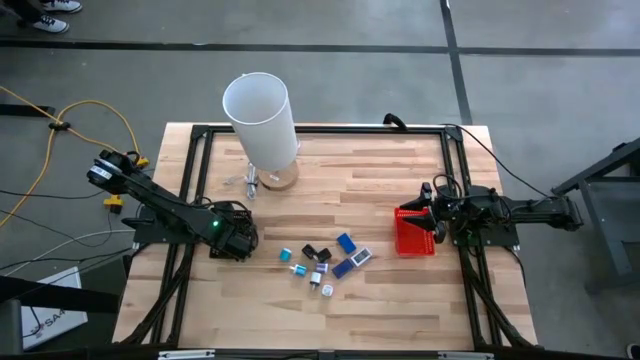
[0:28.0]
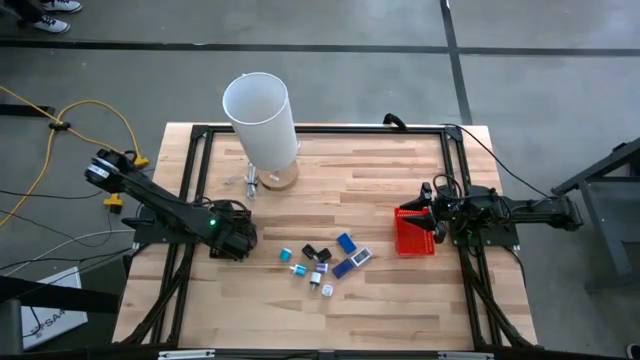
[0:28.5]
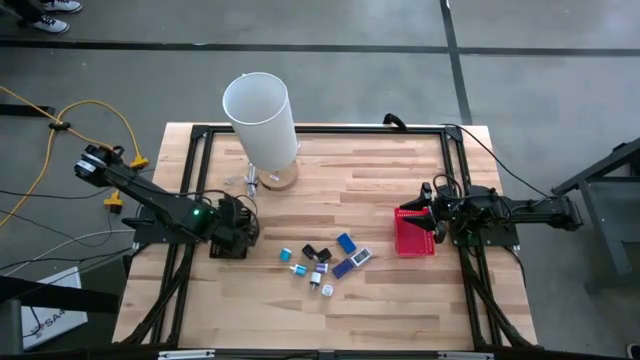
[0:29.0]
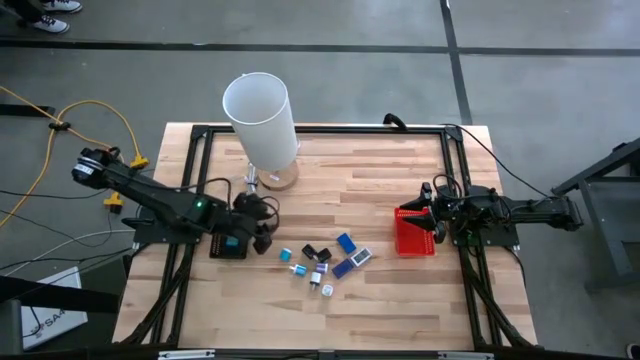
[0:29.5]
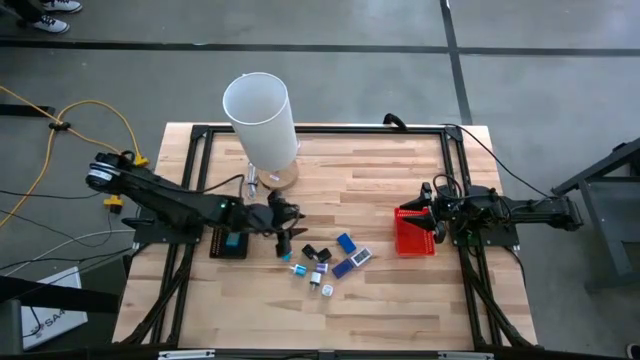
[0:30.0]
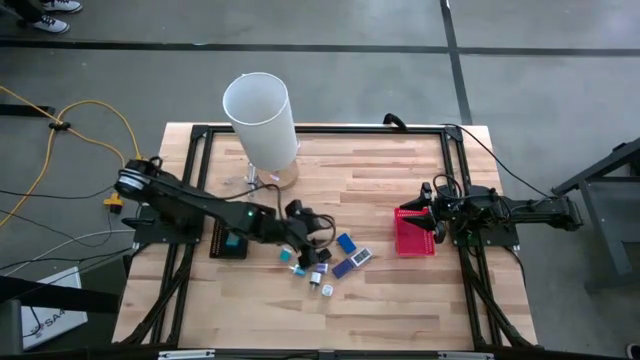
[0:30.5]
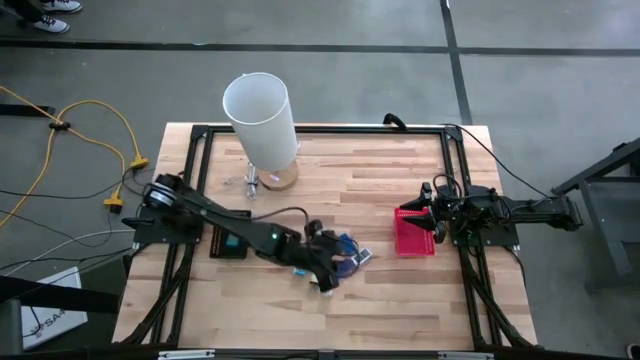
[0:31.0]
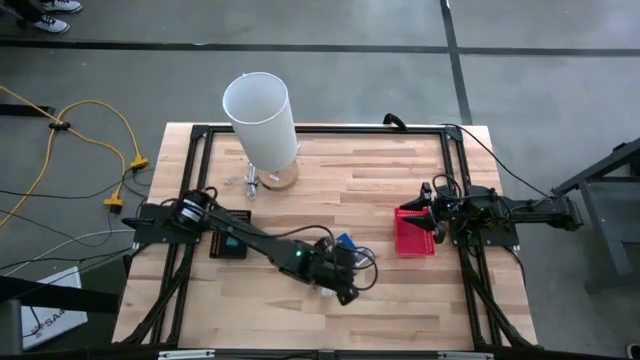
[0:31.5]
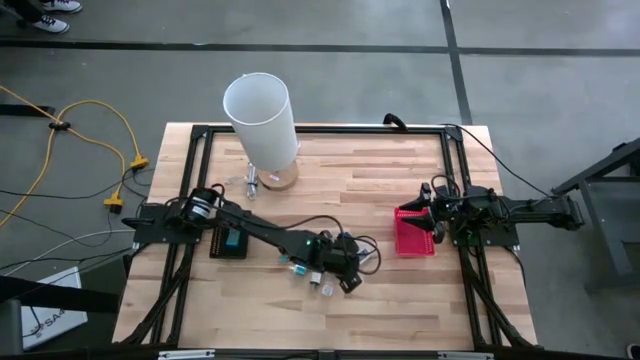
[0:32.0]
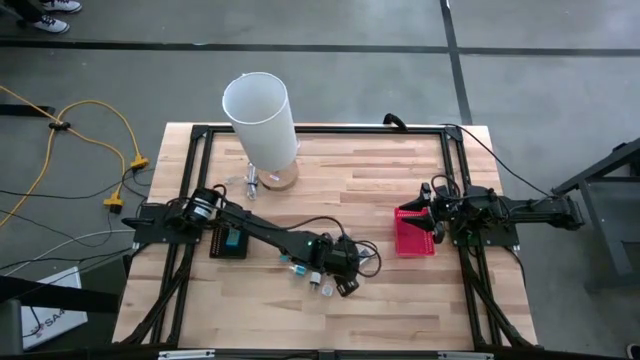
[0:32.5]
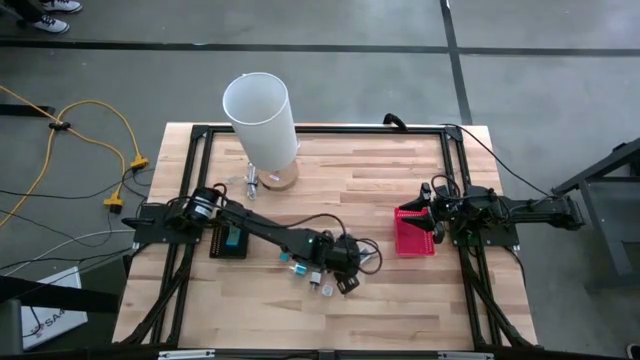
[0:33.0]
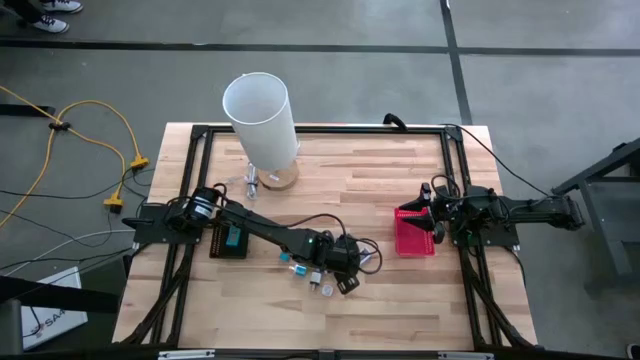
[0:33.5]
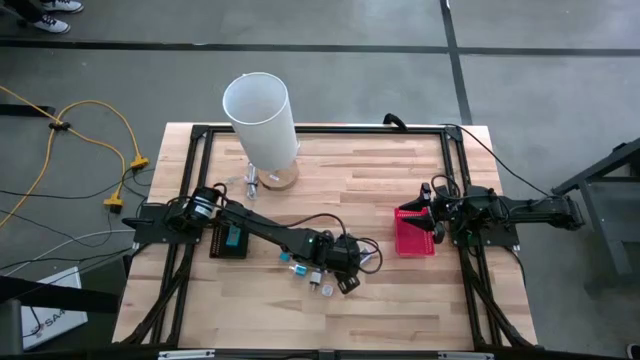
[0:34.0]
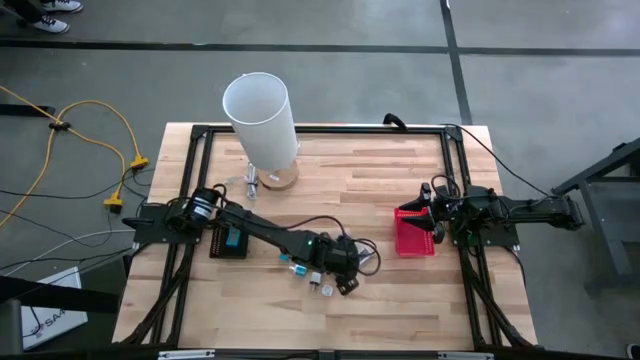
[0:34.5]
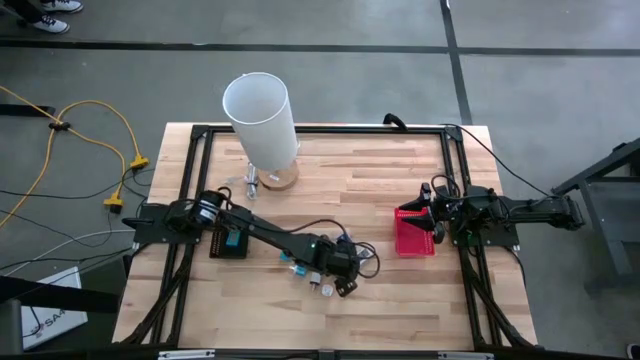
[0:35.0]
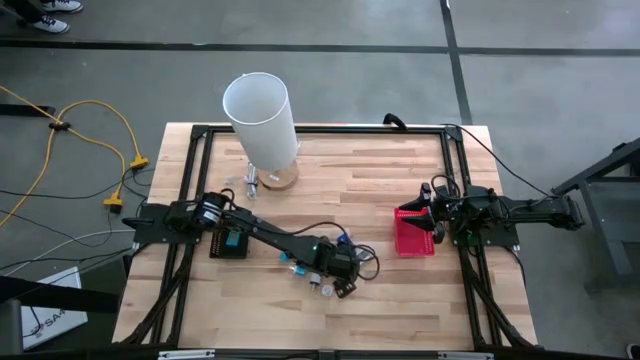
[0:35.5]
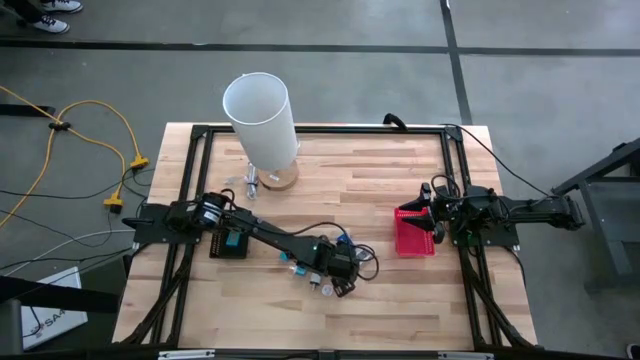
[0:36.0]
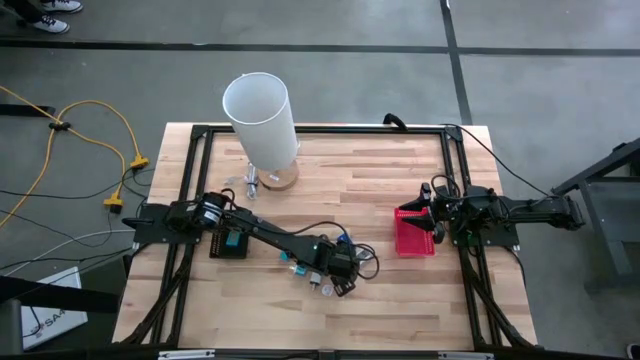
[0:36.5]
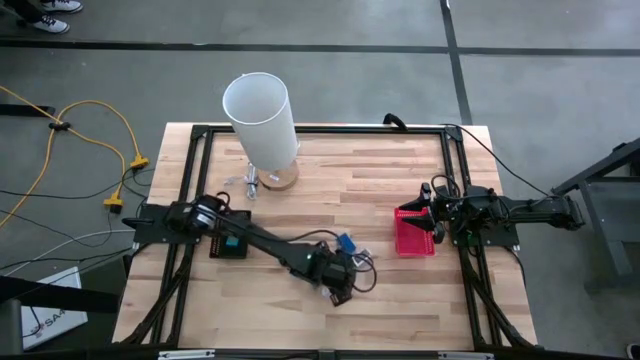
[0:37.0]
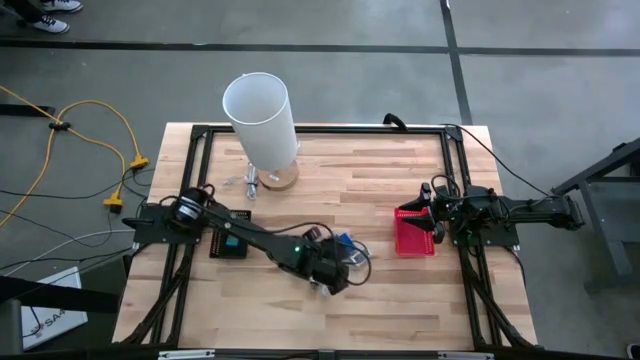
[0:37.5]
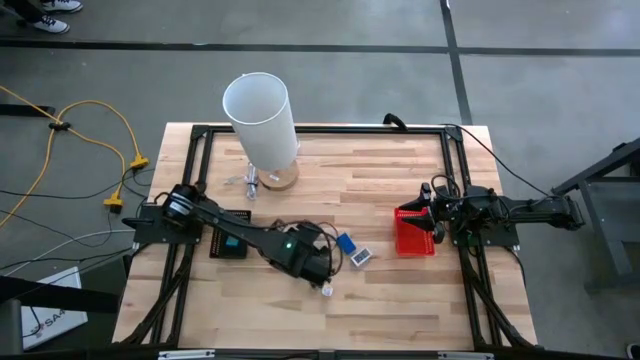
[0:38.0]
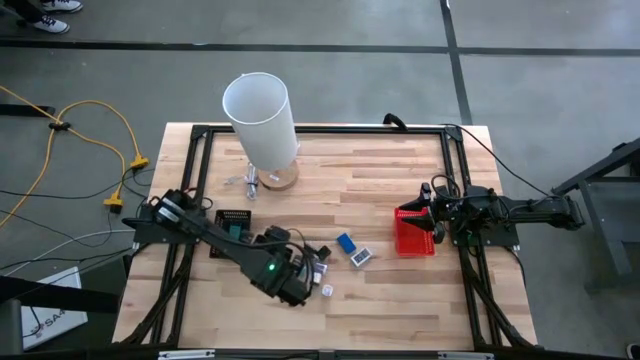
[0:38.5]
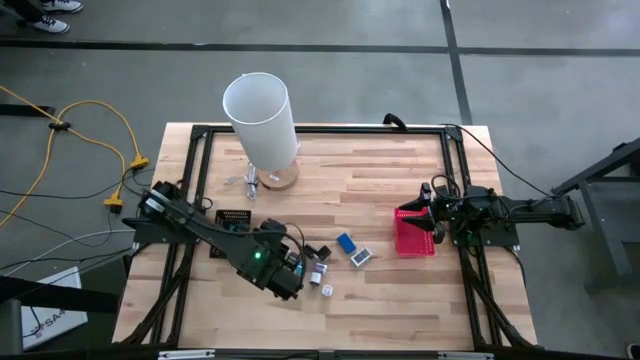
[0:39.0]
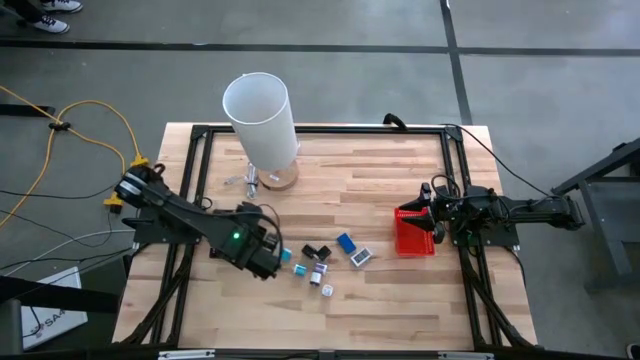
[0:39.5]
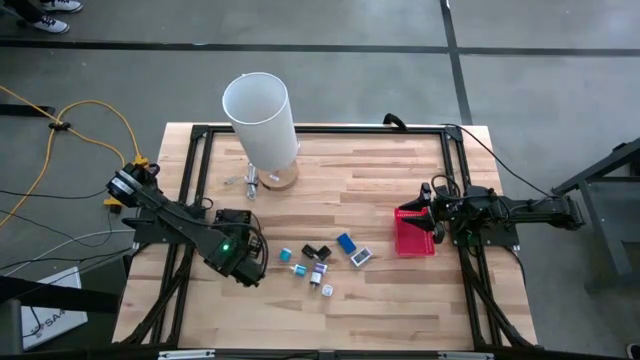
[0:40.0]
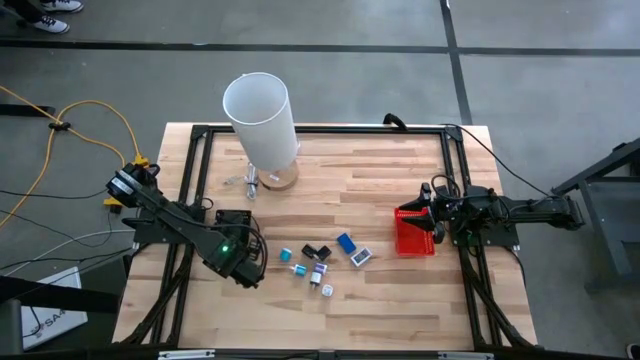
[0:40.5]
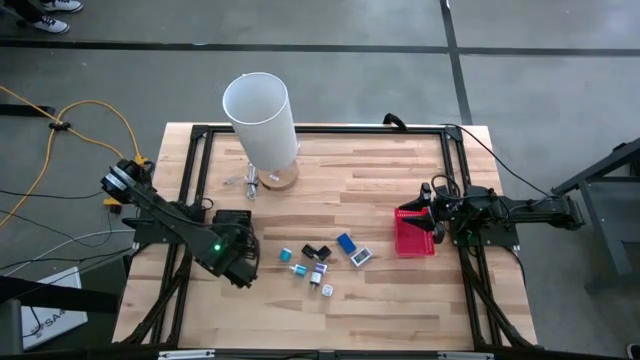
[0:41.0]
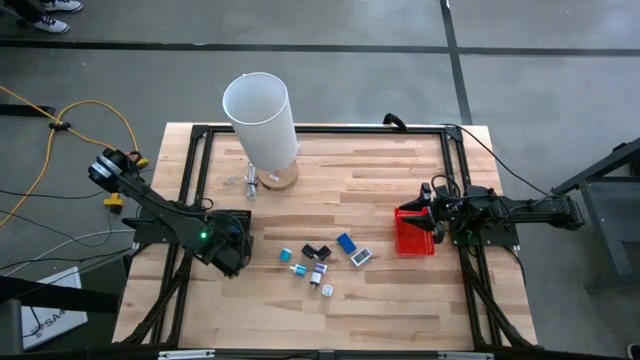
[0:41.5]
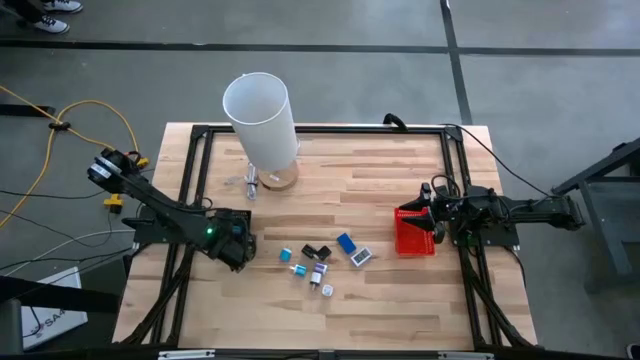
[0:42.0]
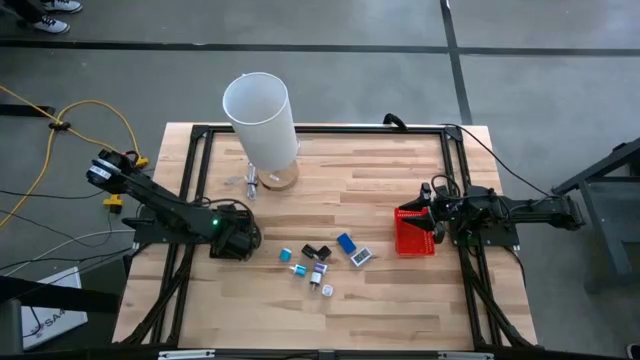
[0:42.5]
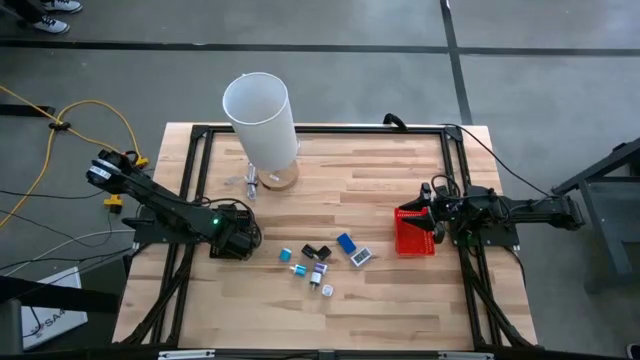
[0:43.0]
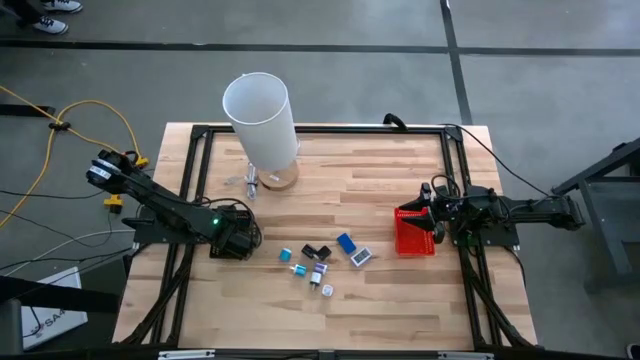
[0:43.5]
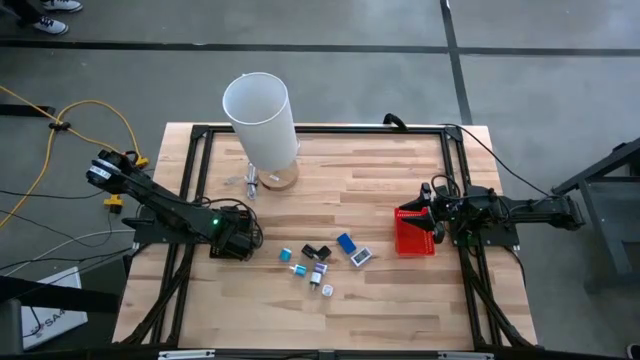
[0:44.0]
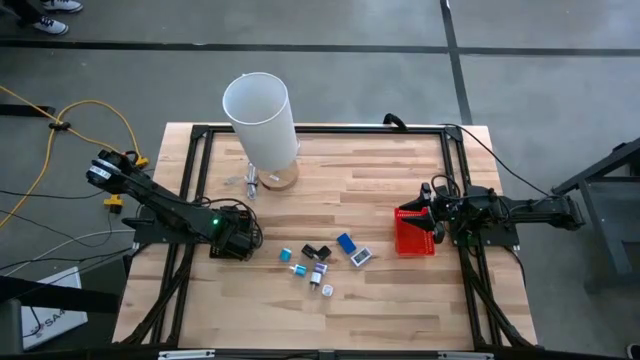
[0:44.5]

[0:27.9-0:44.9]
Task: Pick & Place Office items
Put the bottom dark blue digital timer into the black bin

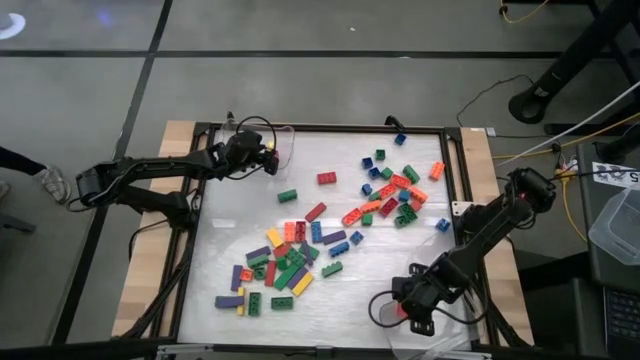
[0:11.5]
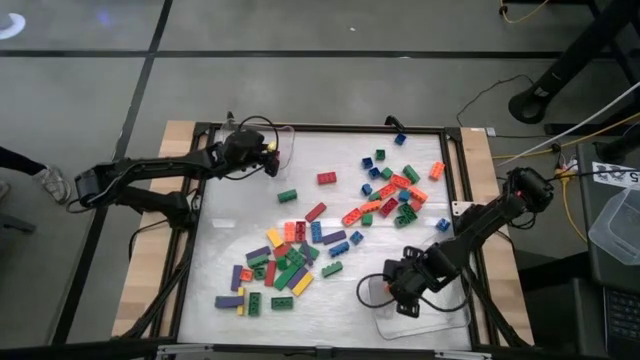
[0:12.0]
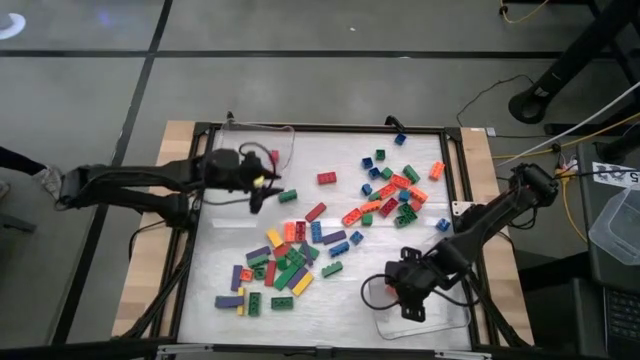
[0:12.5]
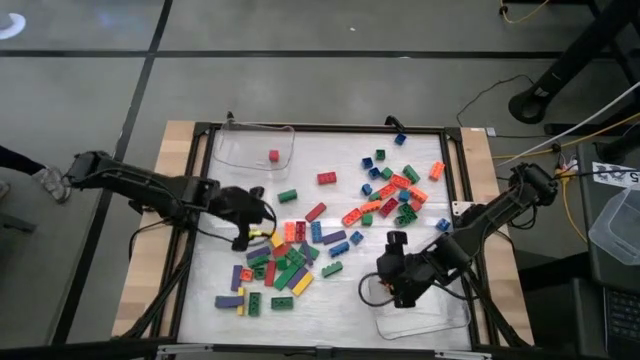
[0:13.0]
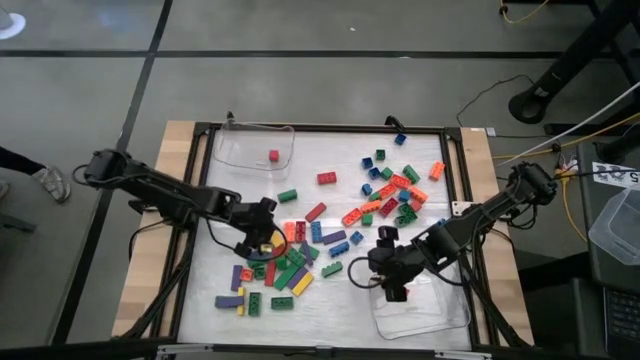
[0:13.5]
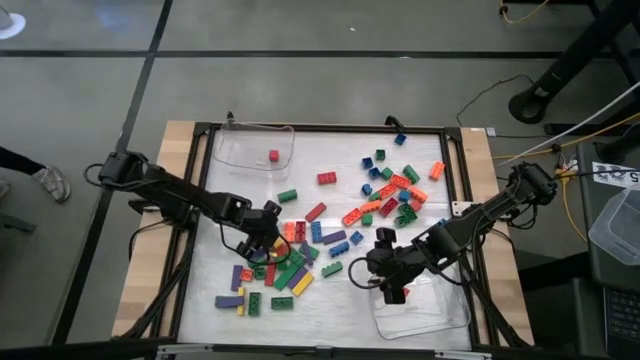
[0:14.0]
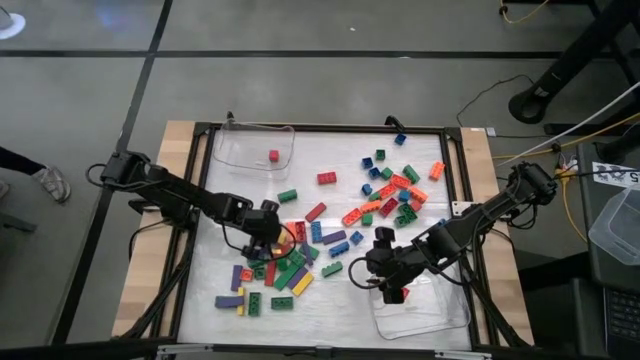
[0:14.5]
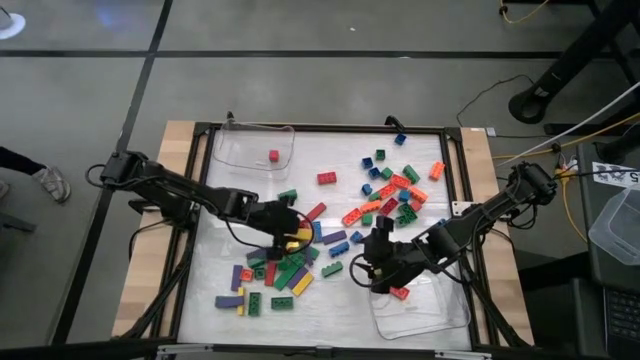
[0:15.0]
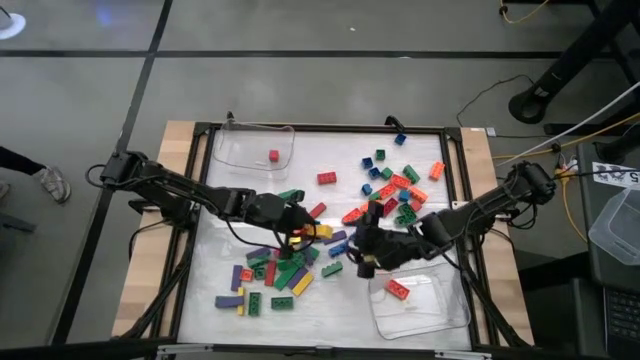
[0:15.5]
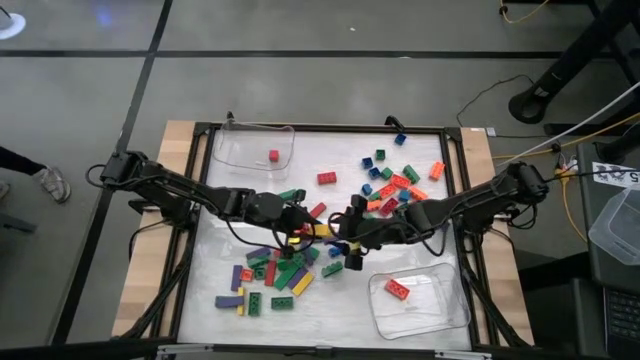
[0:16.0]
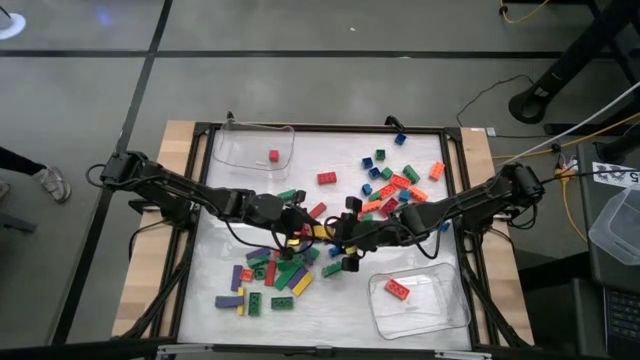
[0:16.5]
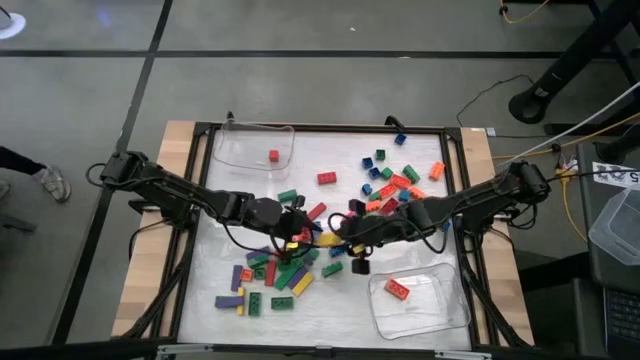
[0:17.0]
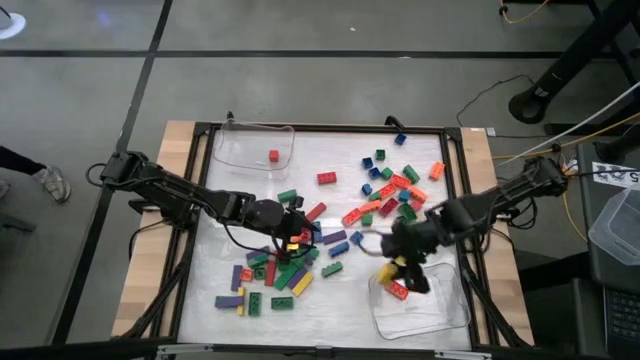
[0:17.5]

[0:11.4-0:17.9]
Task: Sort blocks by size
Put the rectangular yellow block into the bottom transparent bin
